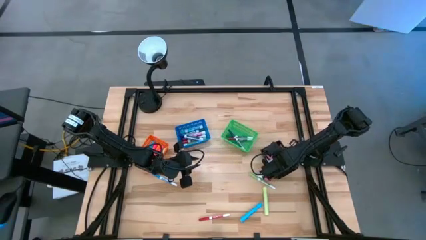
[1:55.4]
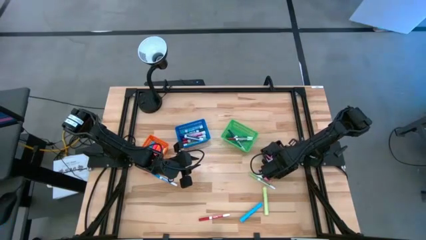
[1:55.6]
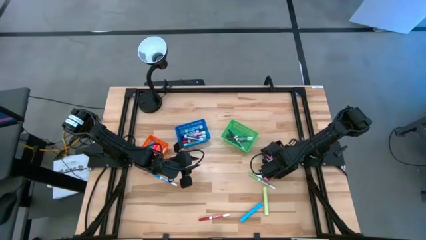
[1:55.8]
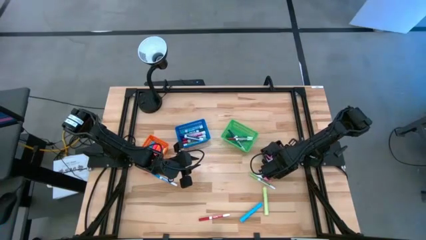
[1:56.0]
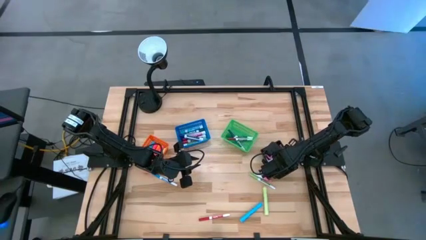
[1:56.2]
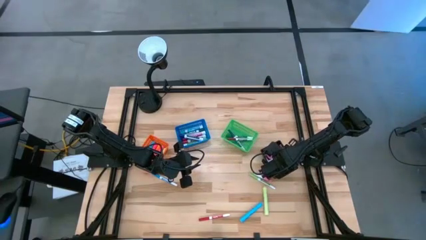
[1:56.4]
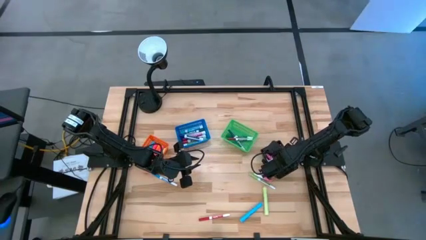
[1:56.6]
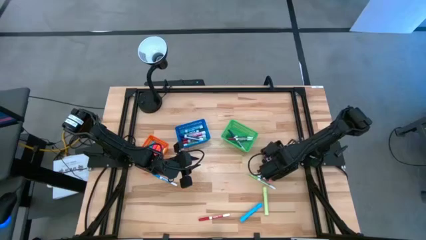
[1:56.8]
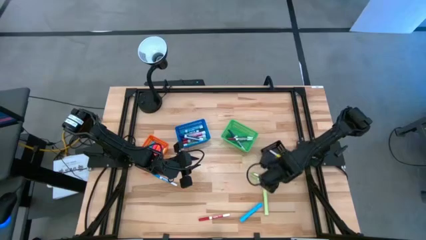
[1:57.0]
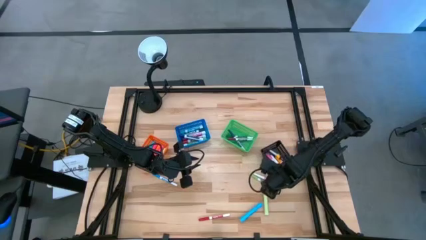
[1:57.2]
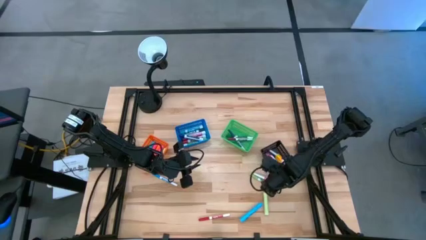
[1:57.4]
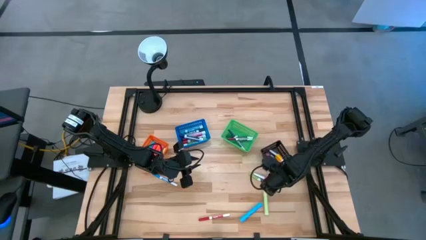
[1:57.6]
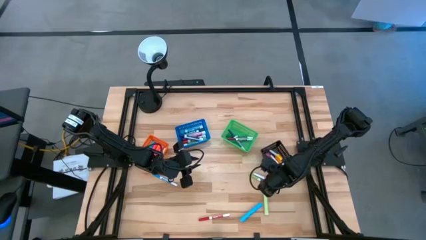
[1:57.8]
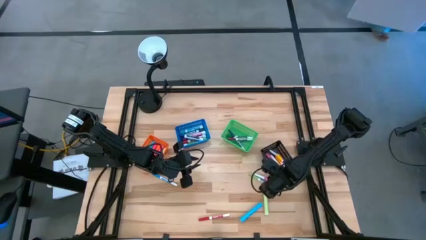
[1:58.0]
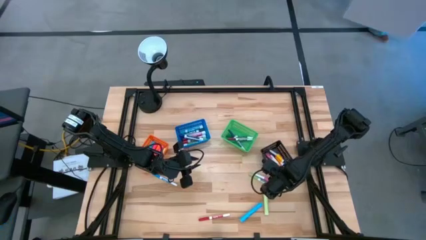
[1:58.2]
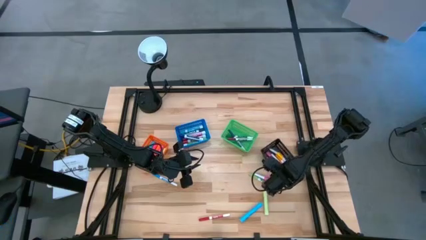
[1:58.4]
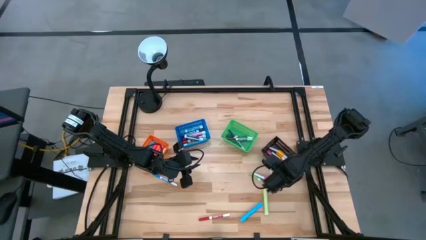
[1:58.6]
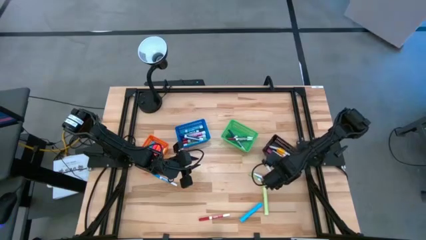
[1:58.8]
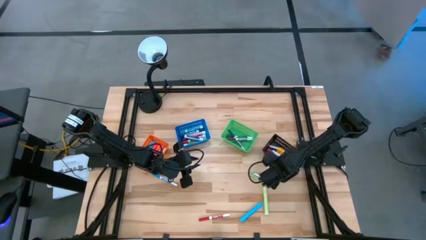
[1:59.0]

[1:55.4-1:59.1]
Task: Pick & Place Markers
Adjust the black basket

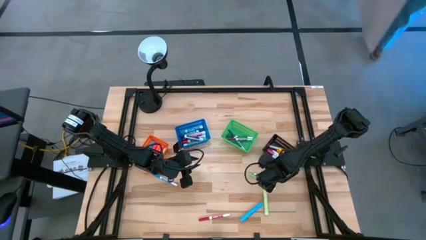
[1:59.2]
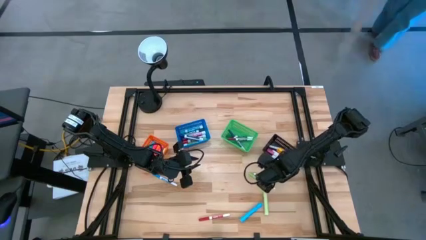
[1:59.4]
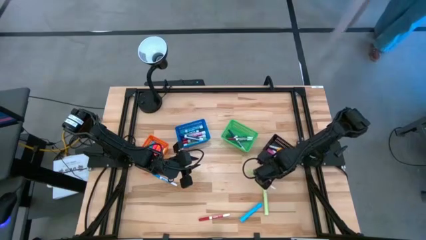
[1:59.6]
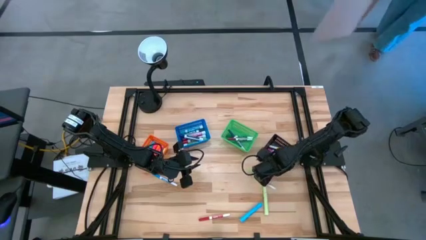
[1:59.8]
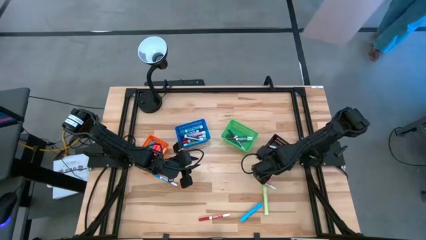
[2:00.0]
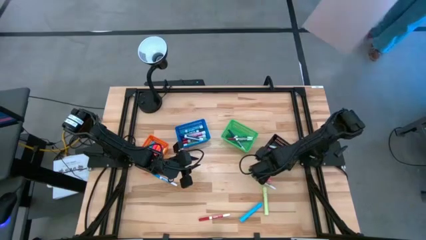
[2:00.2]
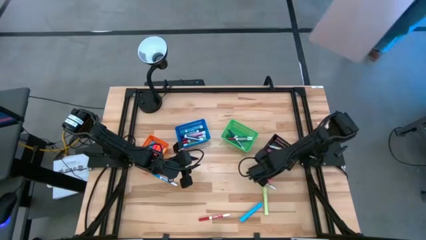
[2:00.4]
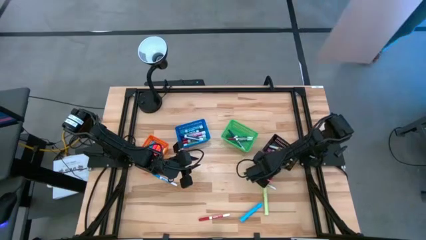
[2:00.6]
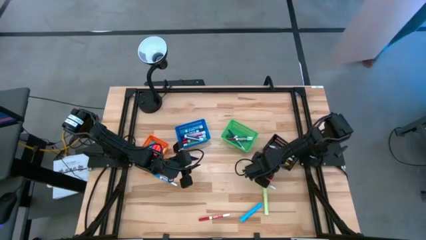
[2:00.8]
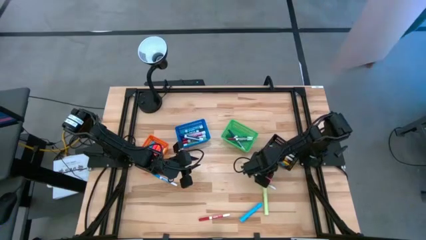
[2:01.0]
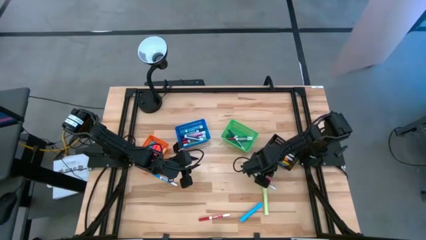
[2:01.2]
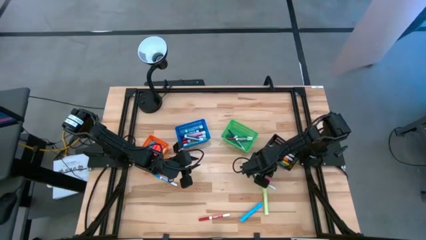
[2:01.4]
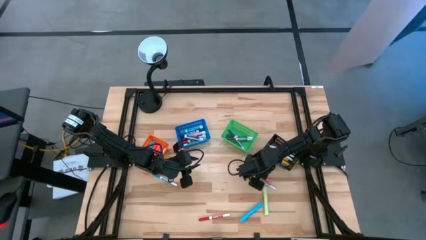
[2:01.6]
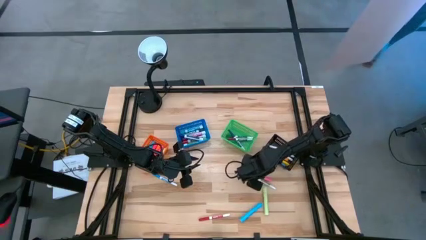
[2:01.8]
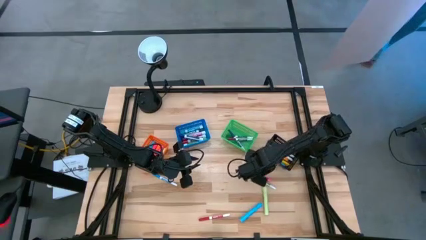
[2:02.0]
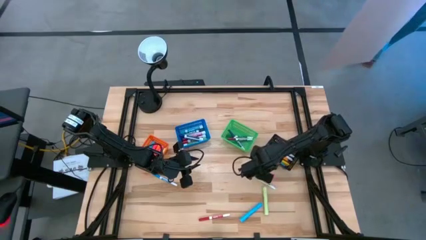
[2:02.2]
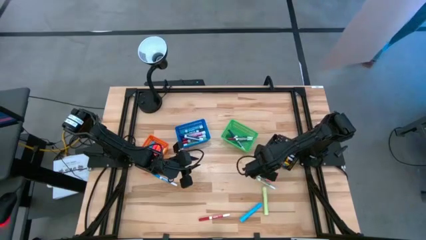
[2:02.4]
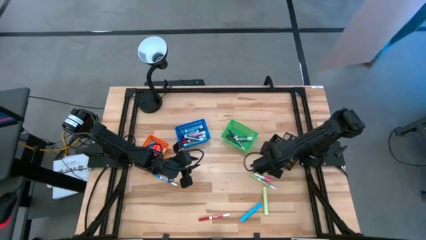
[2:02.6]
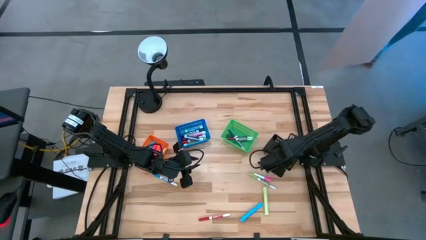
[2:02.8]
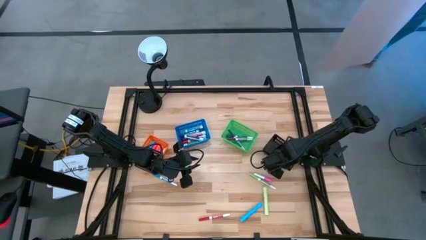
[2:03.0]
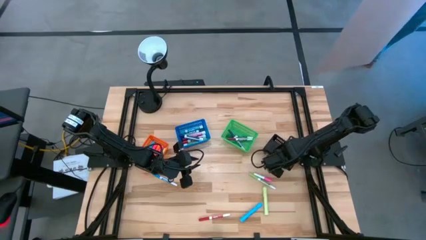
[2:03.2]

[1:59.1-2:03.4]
Put the small black highlighter pen into the black basket

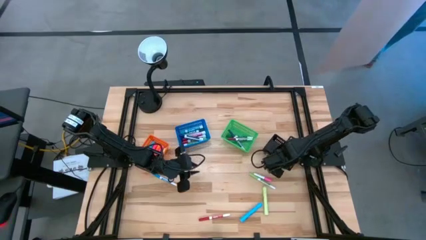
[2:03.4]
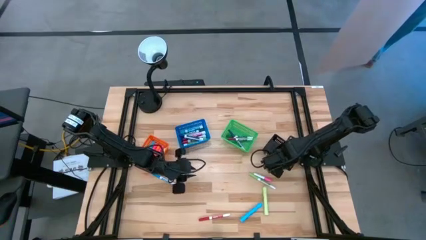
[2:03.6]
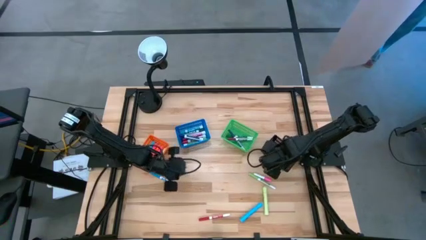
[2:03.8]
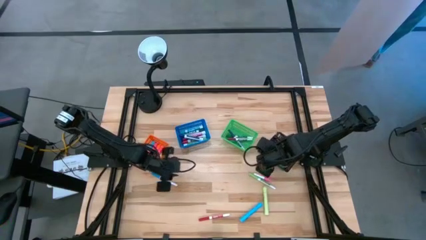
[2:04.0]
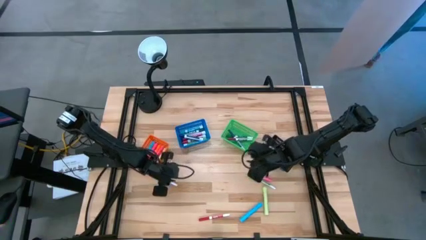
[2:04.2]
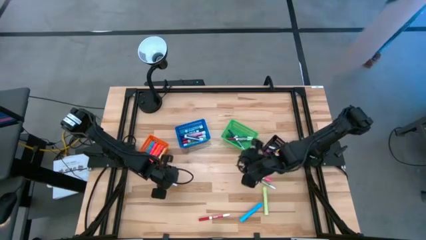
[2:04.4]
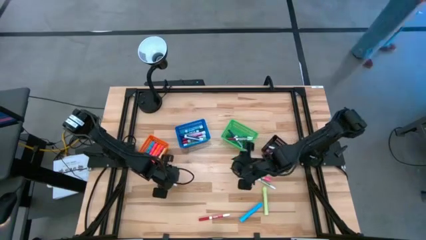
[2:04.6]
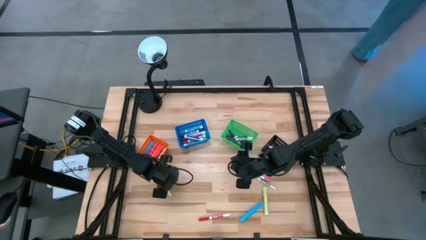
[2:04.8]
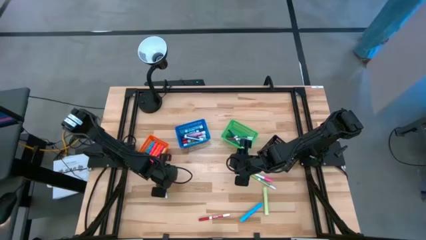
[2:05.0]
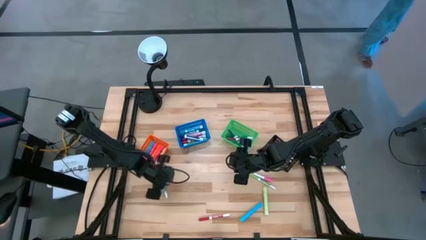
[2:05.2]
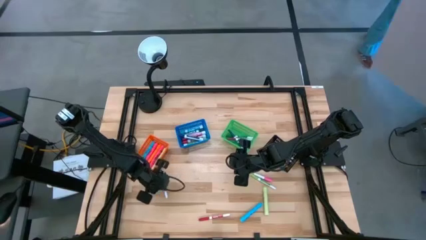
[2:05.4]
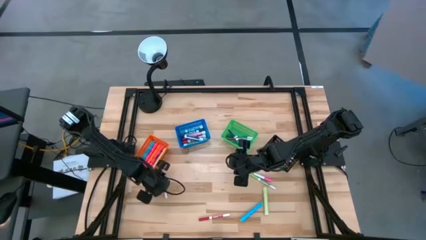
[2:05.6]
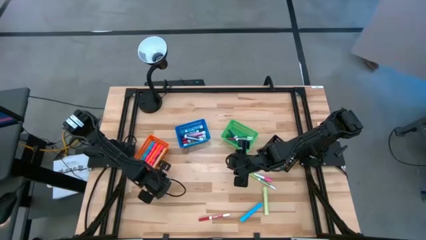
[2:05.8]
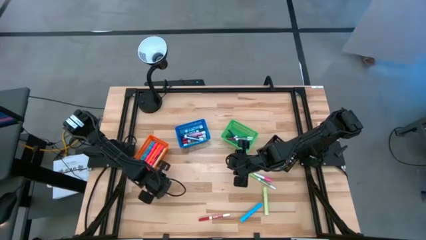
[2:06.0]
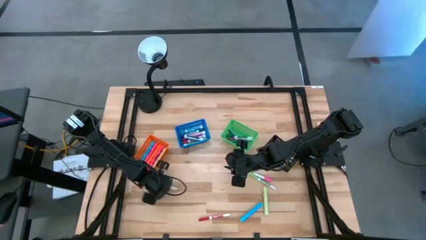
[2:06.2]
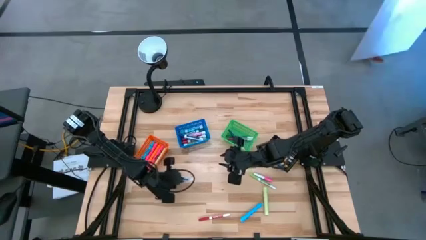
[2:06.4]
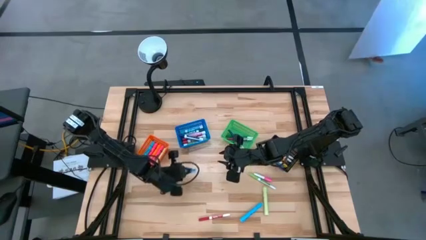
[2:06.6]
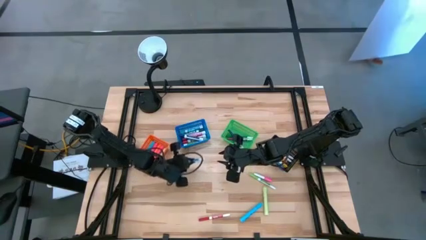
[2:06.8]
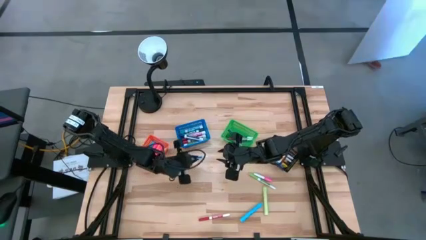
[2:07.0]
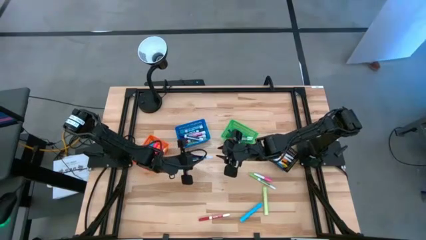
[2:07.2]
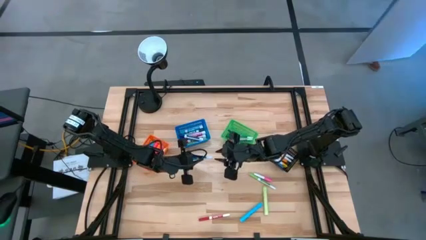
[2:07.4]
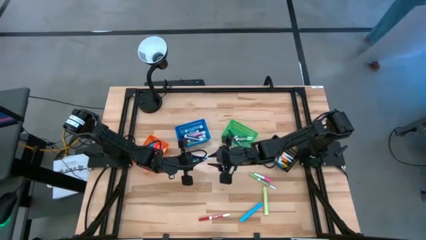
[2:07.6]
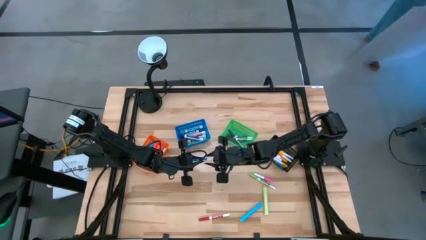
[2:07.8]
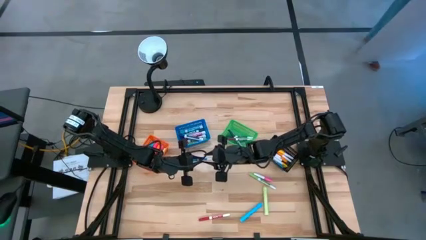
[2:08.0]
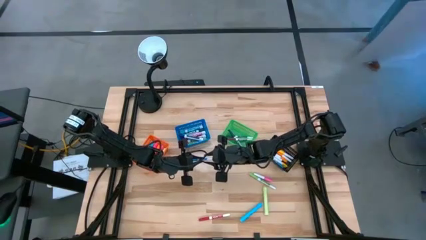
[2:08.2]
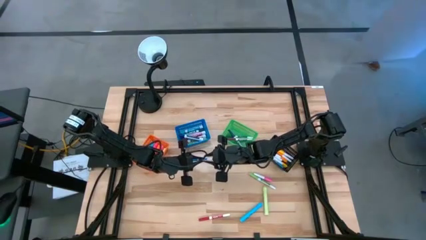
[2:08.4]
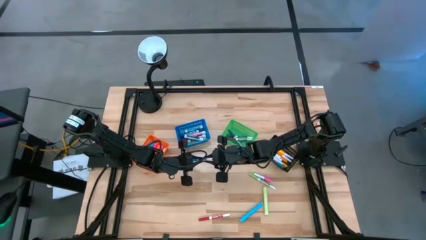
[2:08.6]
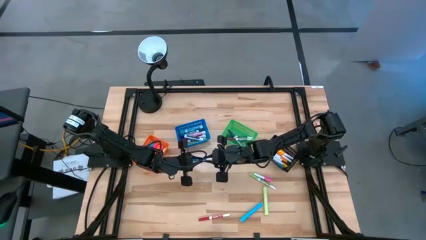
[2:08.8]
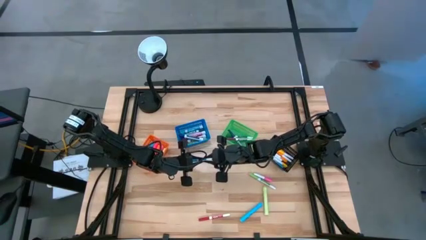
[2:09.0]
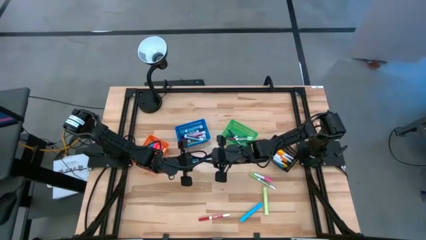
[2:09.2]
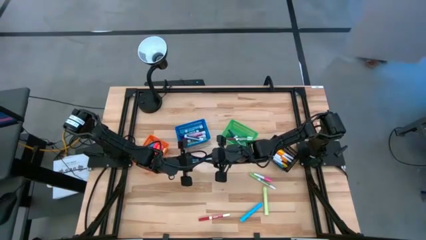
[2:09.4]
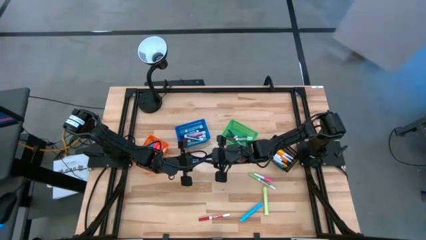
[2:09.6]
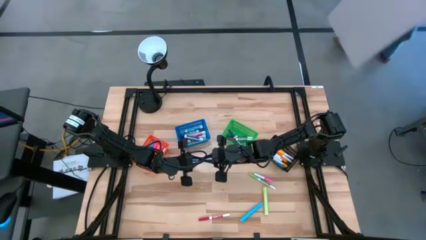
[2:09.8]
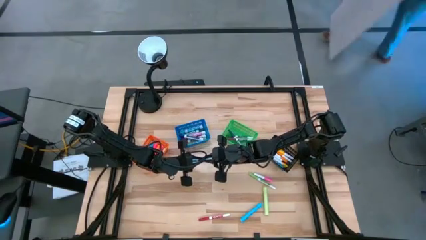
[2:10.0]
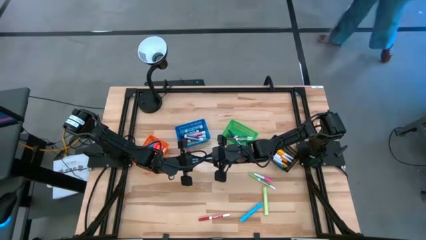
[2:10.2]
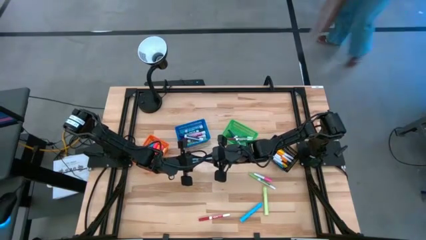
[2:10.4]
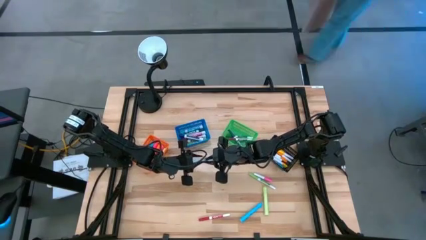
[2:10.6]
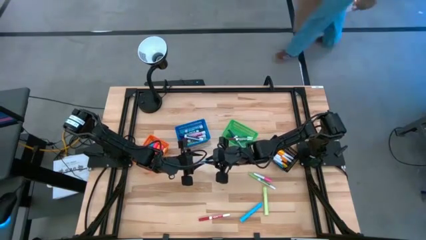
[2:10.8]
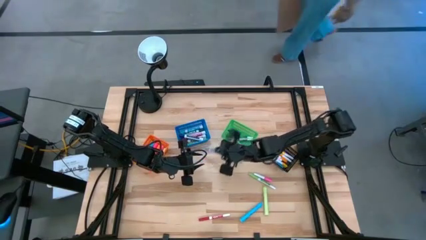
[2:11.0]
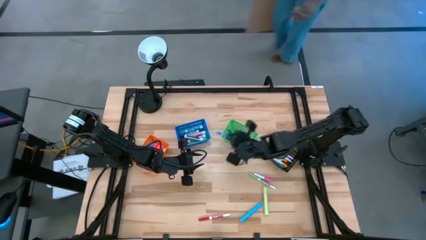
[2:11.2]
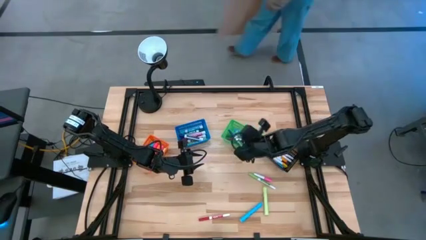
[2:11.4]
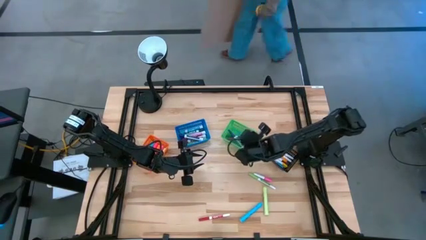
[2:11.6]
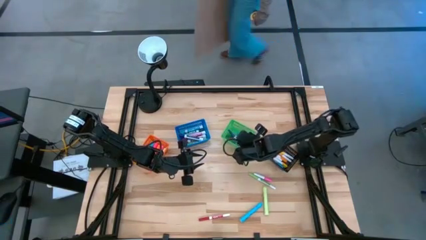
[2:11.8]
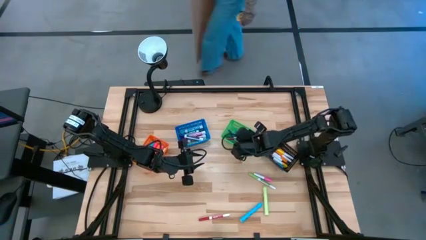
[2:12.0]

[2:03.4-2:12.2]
Put the large light blue marker pen into the green basket
